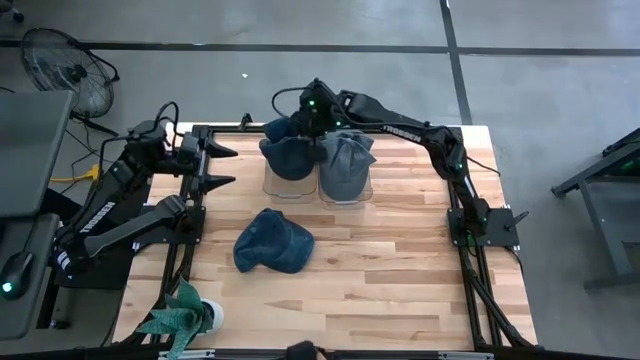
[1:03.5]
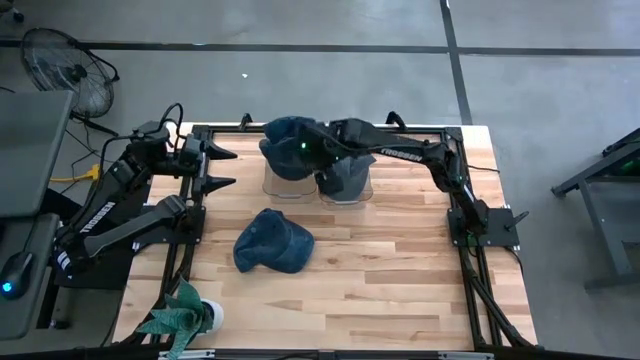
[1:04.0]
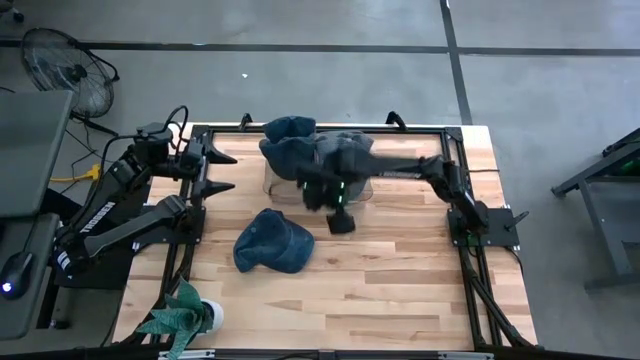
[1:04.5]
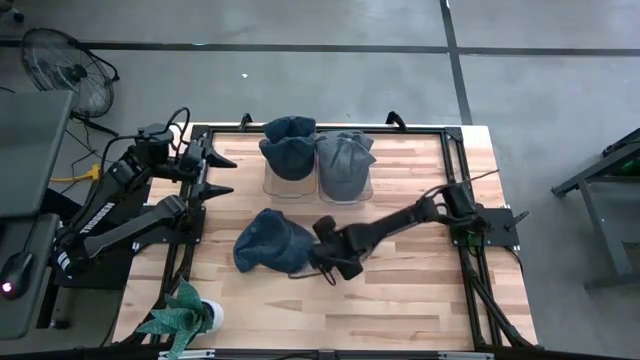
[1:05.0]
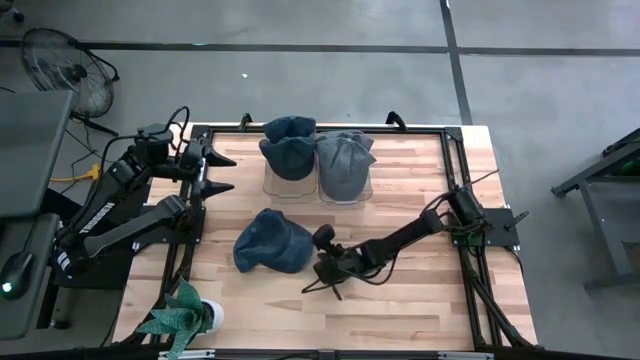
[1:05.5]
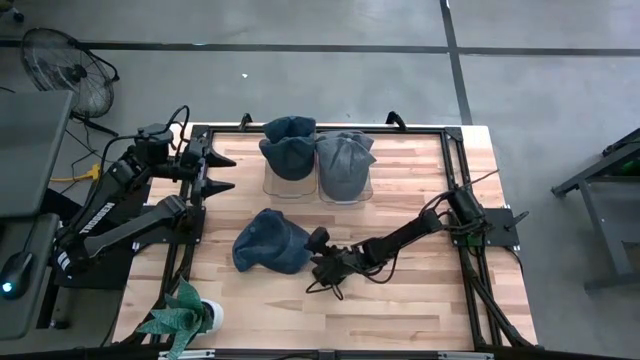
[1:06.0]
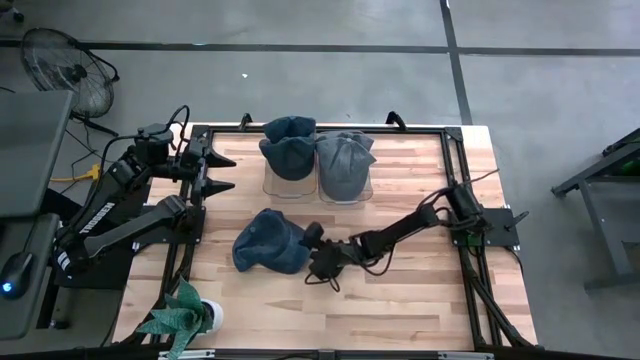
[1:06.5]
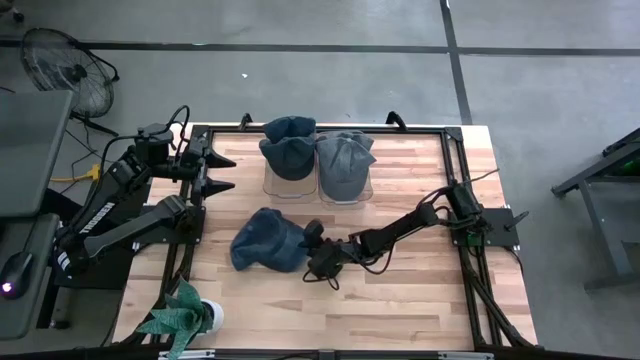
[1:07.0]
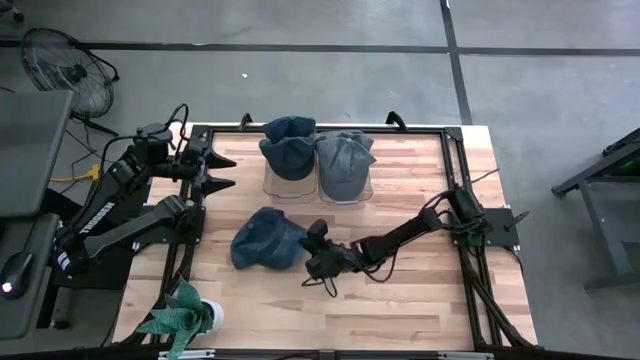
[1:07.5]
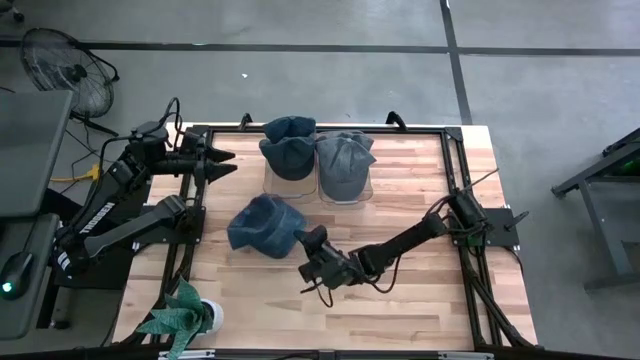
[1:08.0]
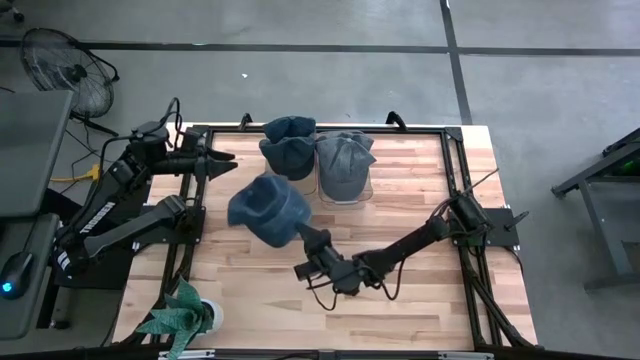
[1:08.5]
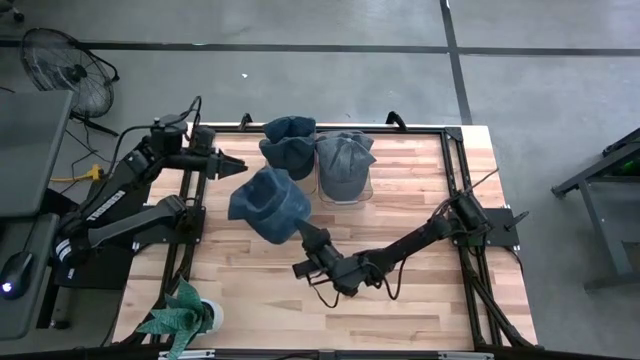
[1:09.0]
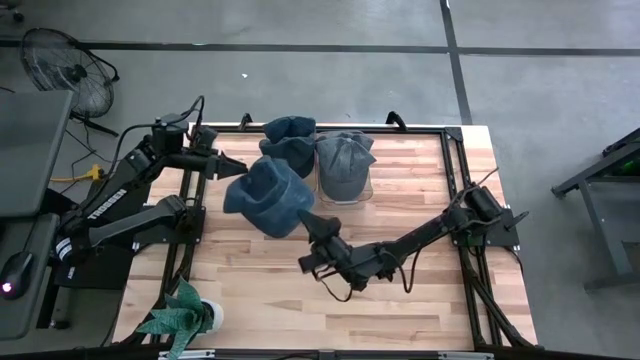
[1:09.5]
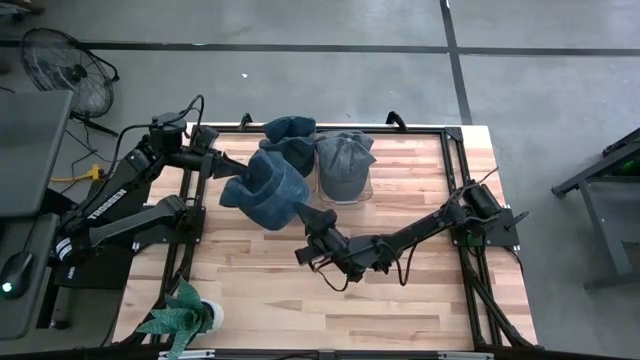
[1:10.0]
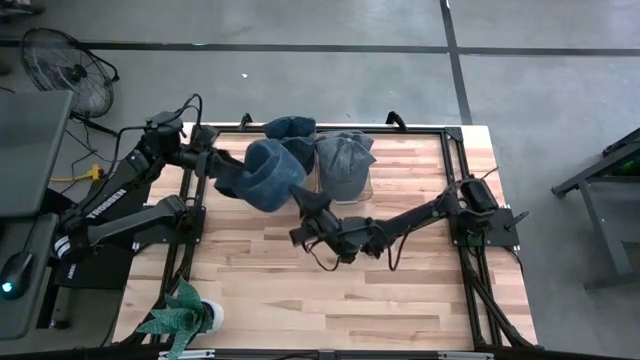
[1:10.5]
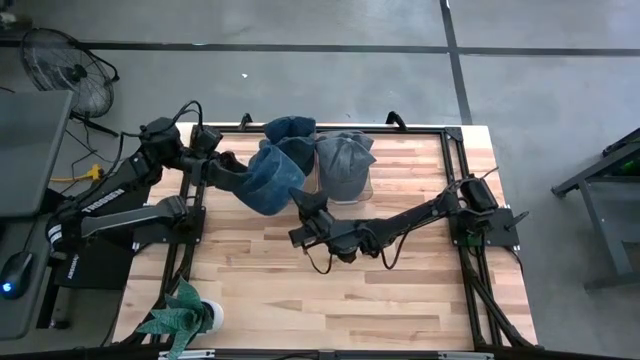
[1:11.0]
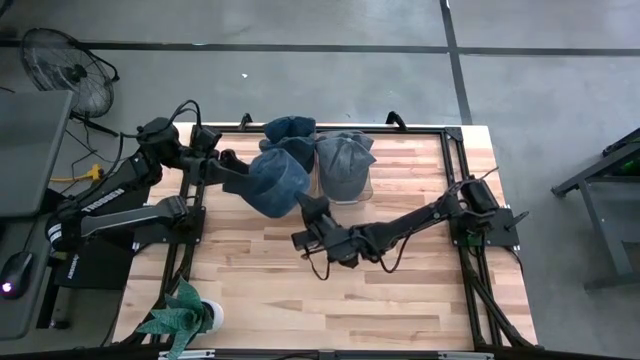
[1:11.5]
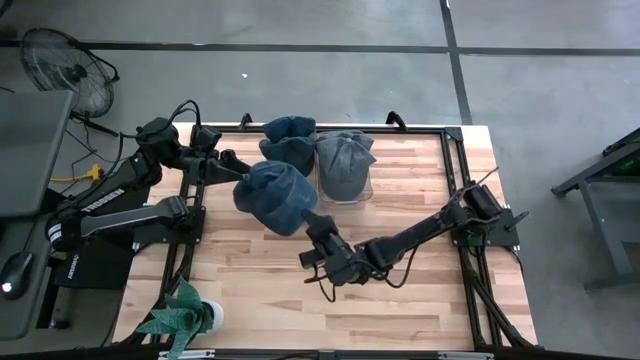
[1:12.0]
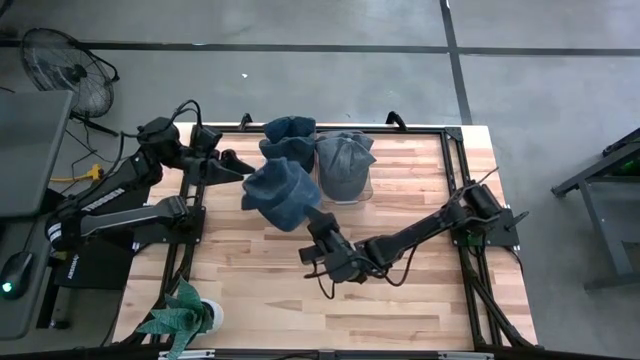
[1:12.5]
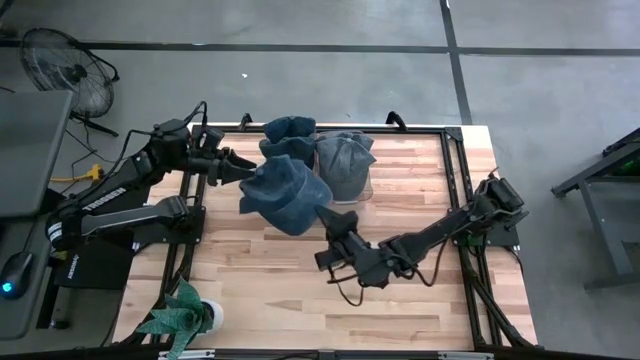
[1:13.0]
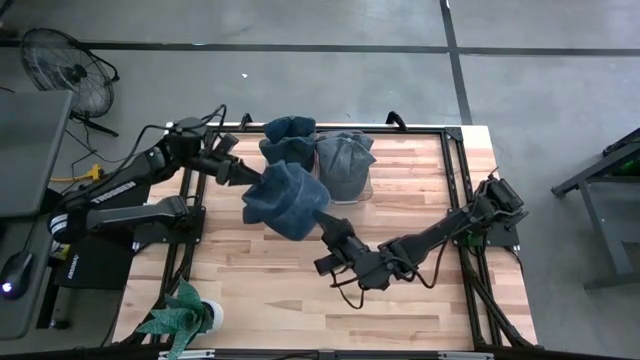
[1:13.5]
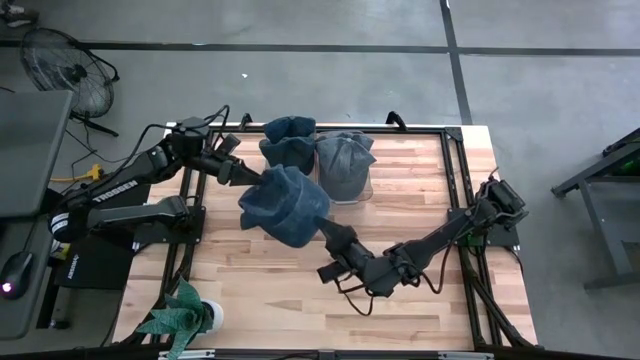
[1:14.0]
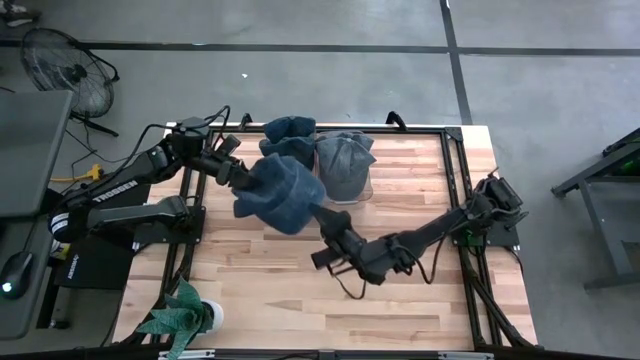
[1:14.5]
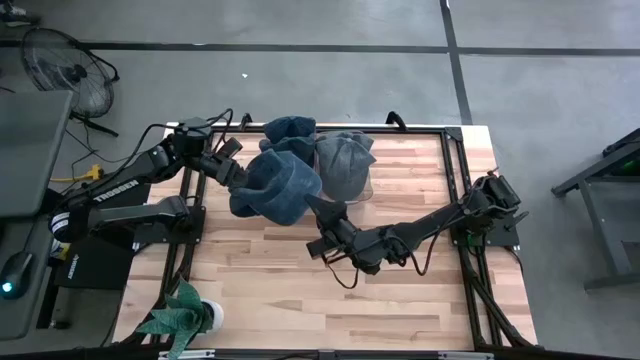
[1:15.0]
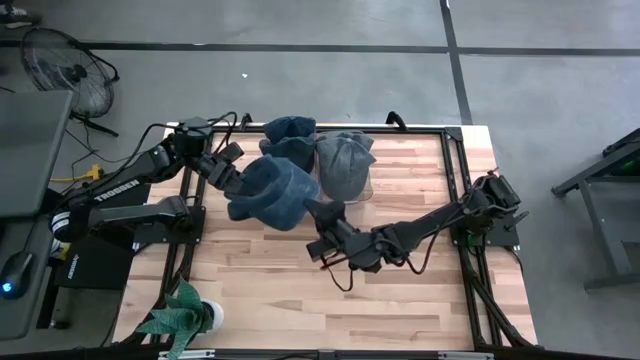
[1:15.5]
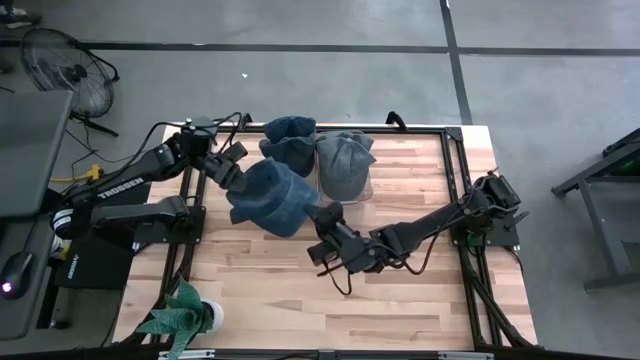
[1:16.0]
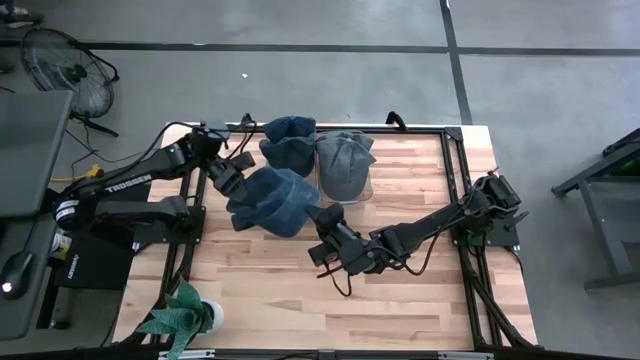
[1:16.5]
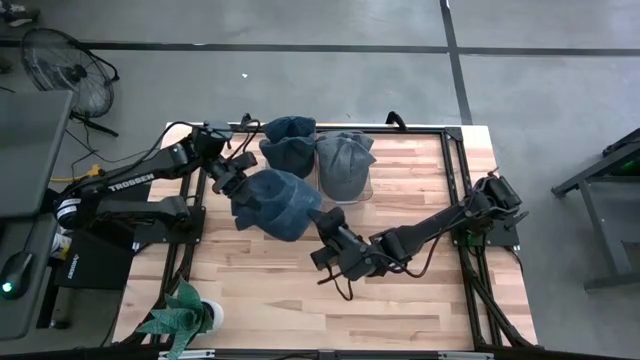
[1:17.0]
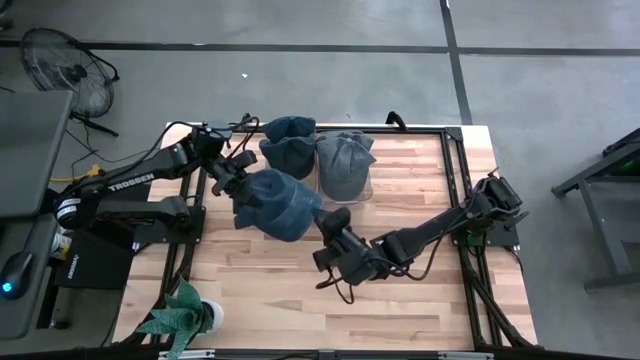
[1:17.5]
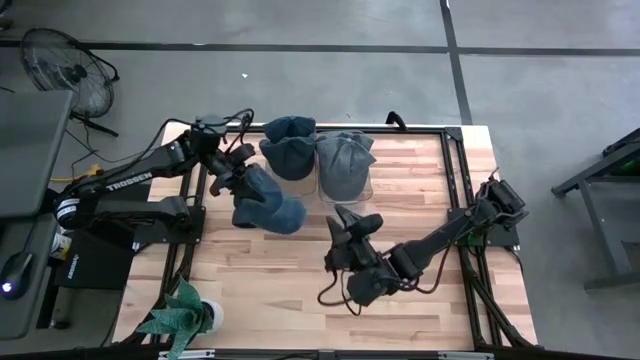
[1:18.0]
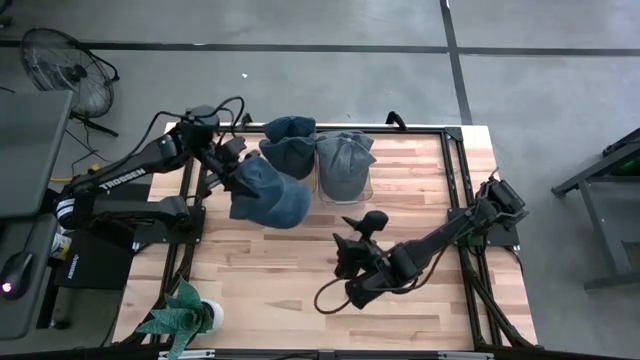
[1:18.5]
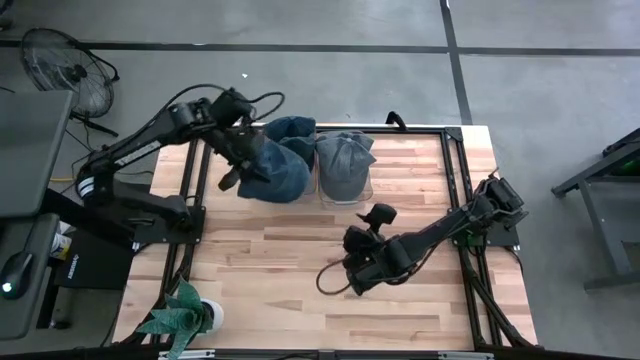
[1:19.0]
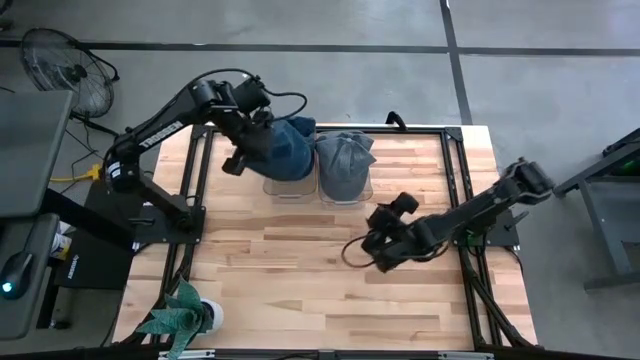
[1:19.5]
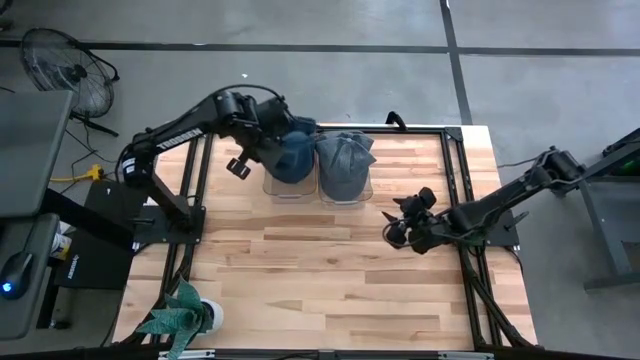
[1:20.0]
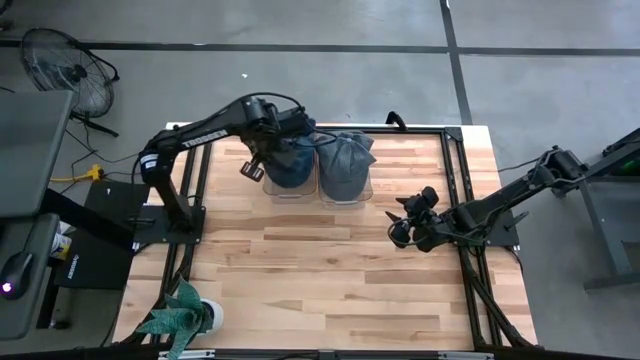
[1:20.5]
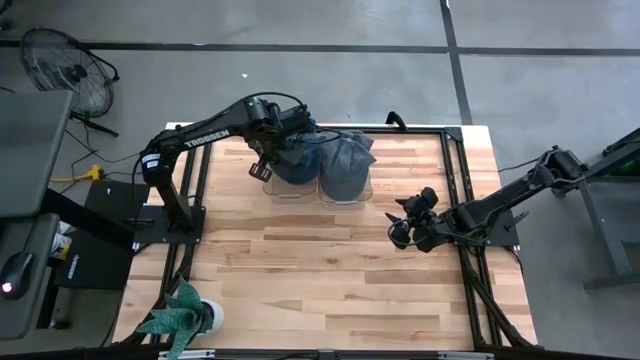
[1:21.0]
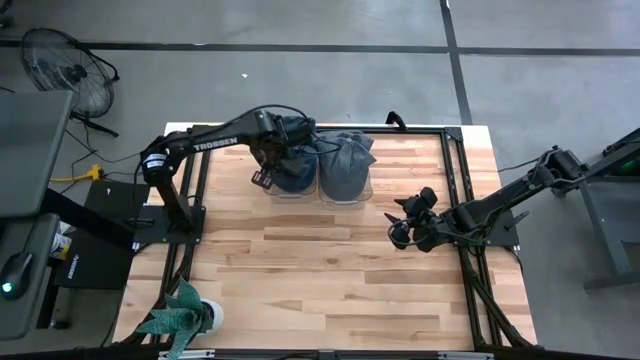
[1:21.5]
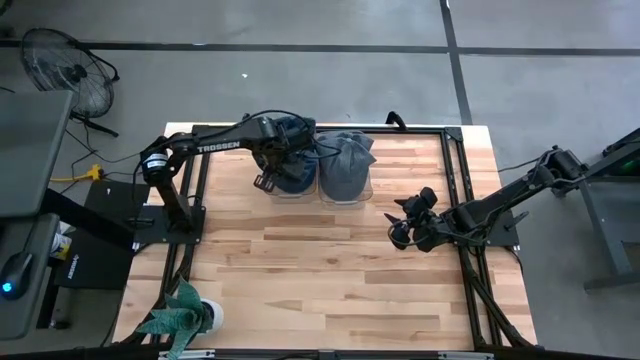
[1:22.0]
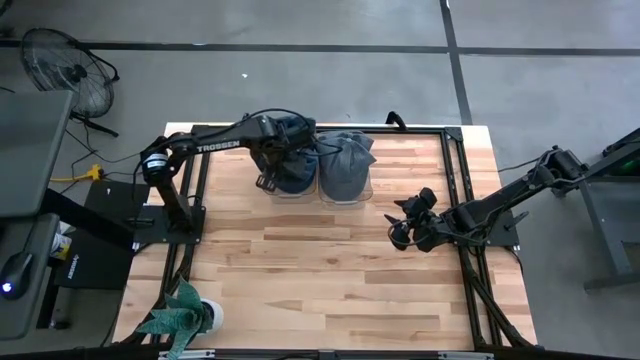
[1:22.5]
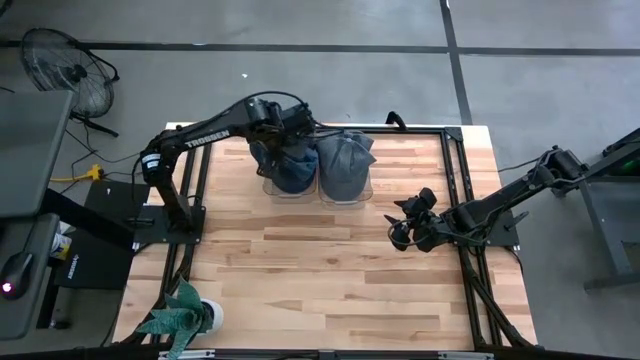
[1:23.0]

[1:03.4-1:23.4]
Task: Pick & Place hat
Put the blue cap into the left transparent bin

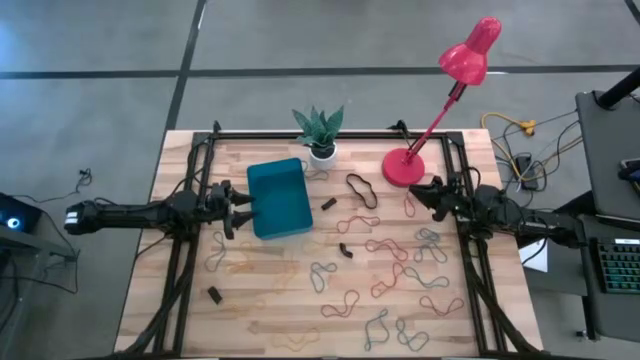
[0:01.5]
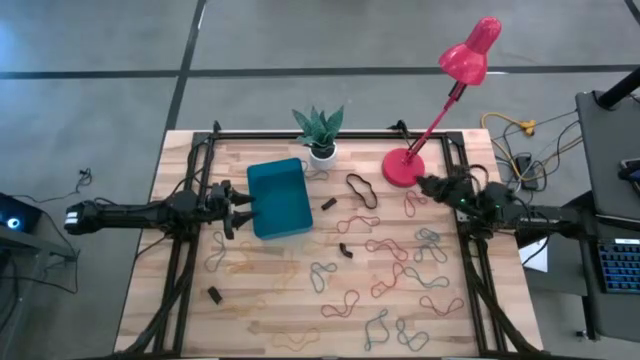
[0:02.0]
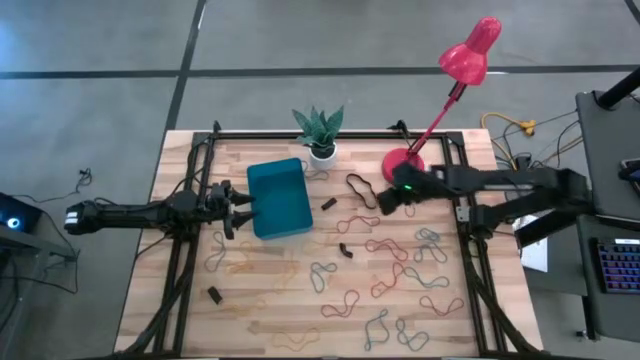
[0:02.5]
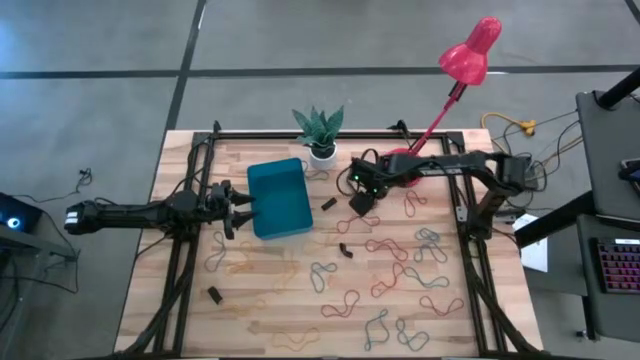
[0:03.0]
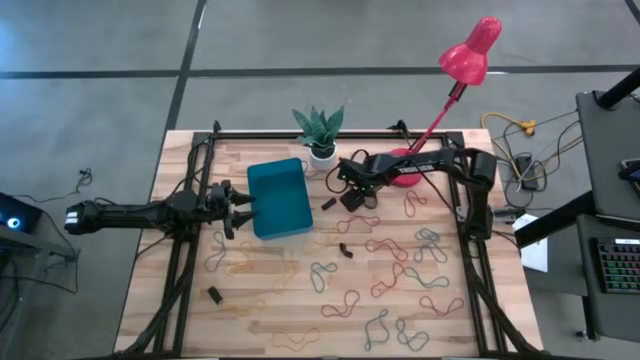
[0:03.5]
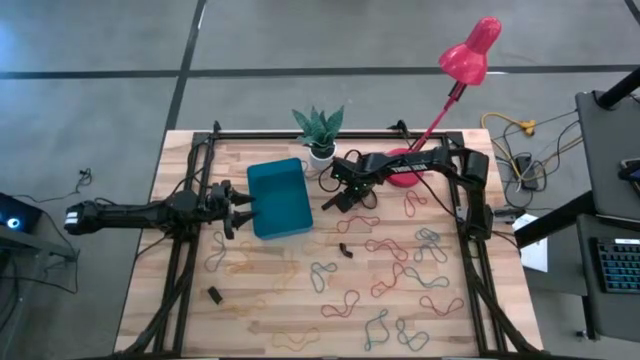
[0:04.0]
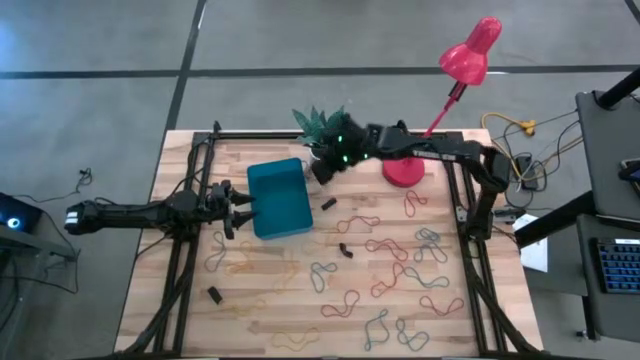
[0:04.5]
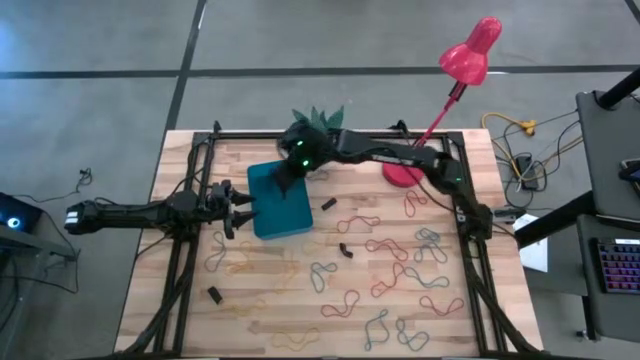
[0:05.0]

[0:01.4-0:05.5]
Task: Pick and place rubber bands into bin
Put the black rubber band into the blue bin
